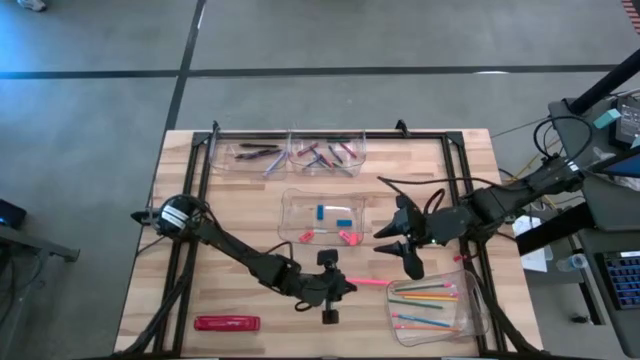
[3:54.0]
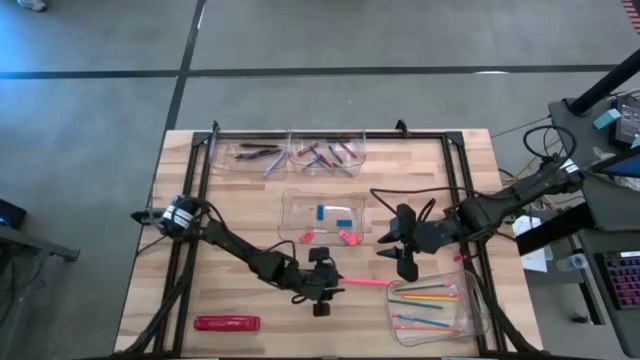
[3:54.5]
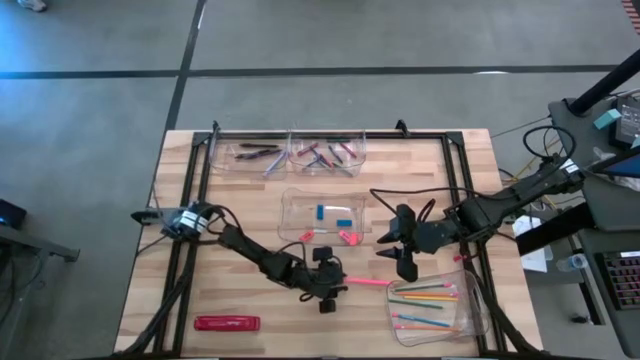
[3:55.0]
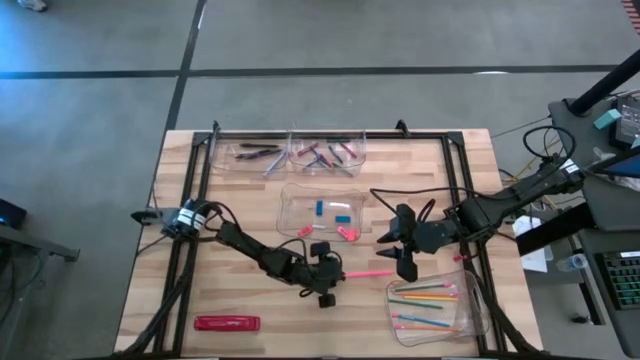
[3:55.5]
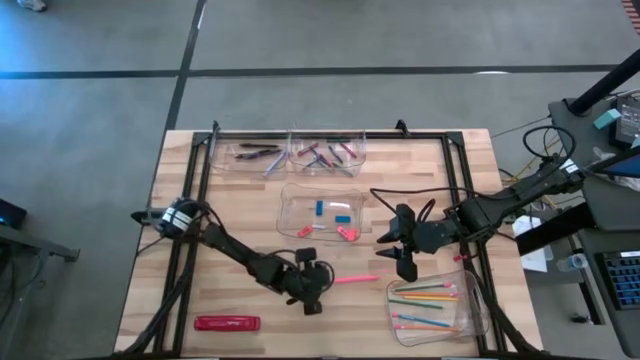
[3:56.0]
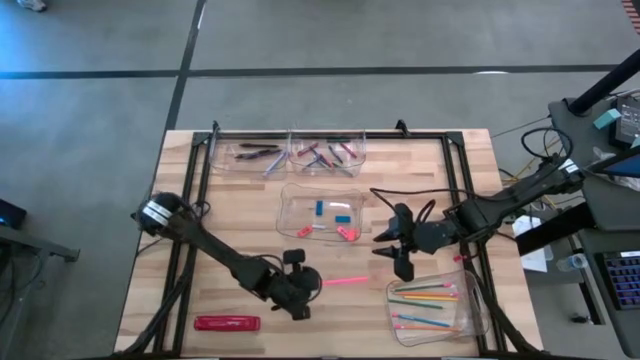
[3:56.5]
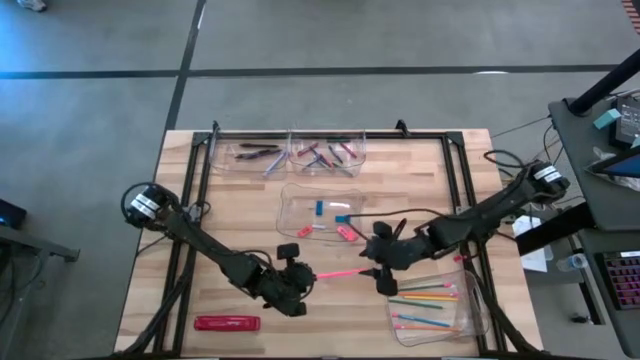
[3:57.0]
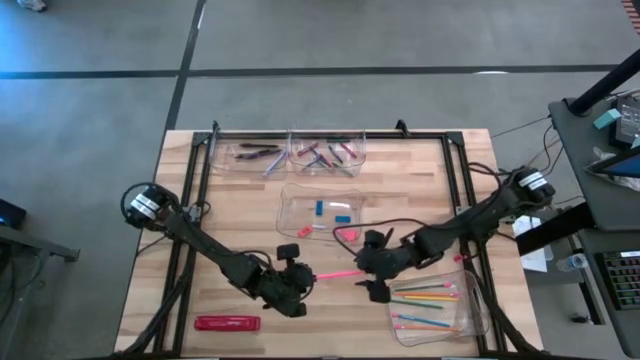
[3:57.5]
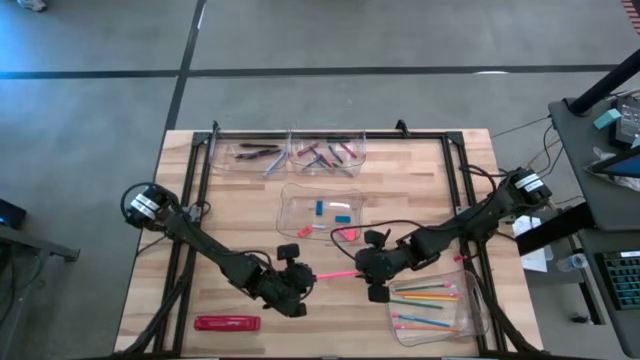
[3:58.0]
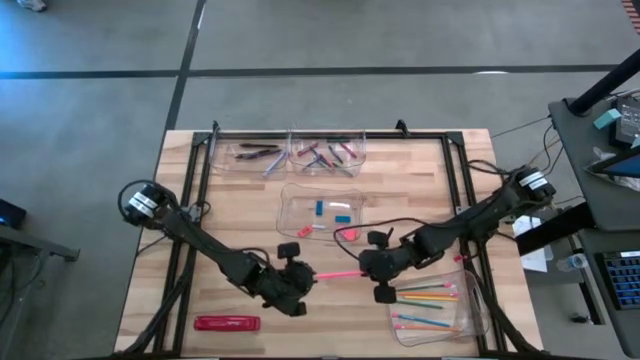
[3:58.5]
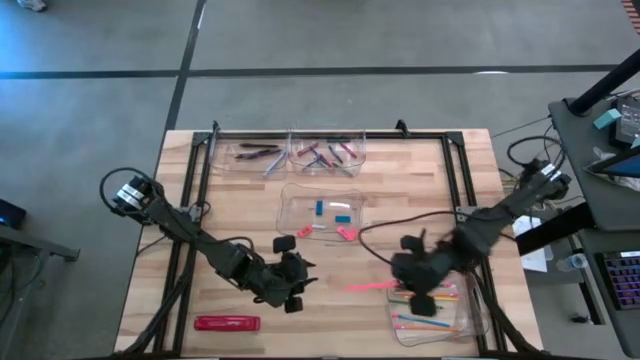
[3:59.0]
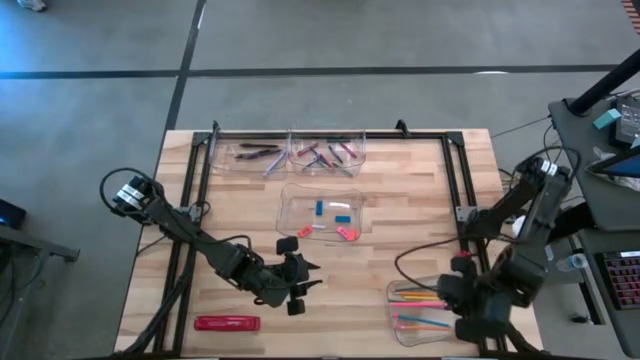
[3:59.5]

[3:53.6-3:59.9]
Task: Sort crayons/erasers/pens/pencils in bins
Put the pink pencil into the bottom transparent bin

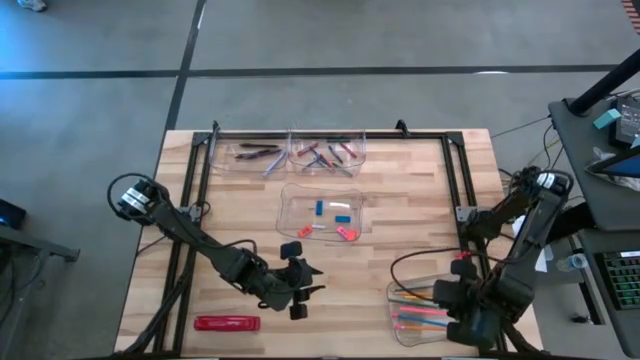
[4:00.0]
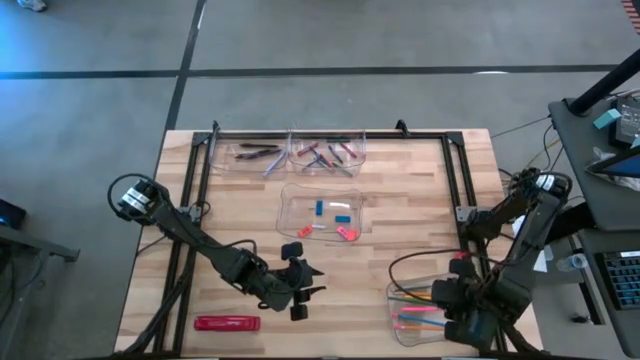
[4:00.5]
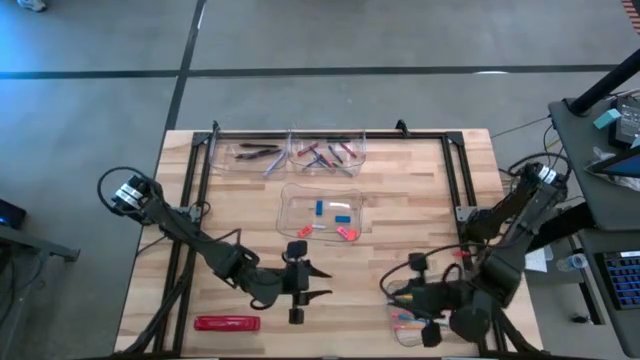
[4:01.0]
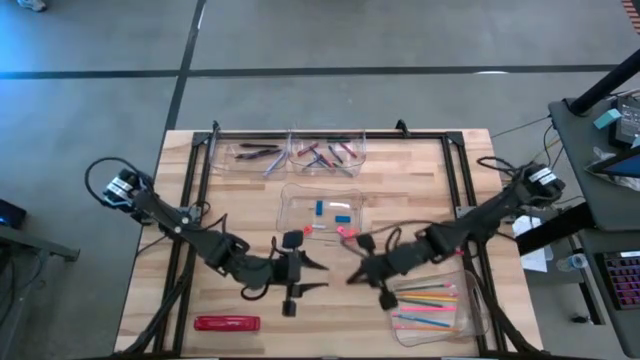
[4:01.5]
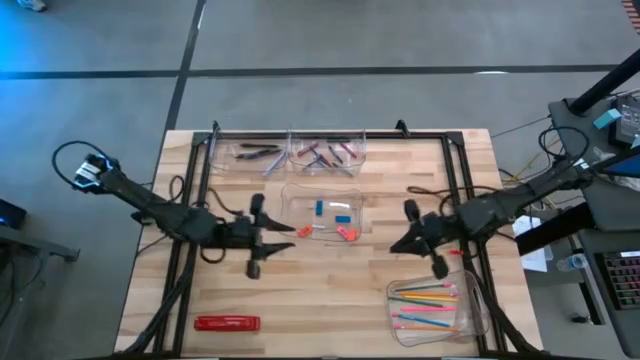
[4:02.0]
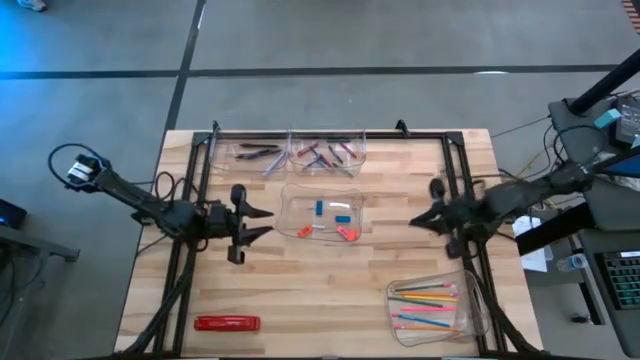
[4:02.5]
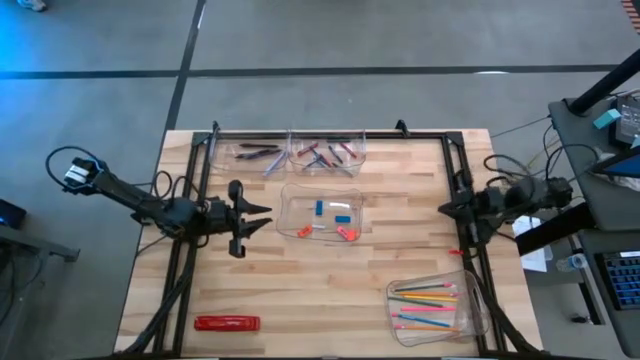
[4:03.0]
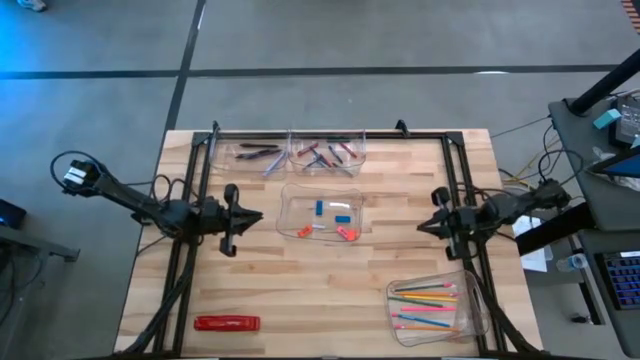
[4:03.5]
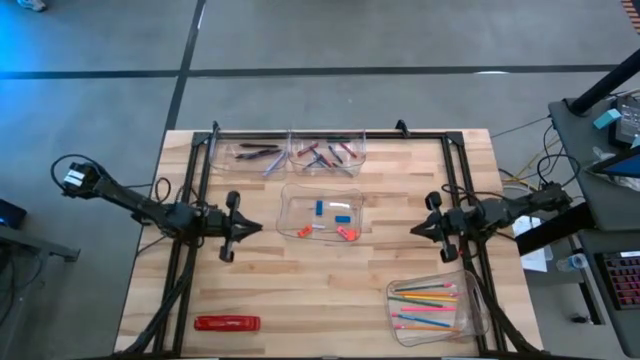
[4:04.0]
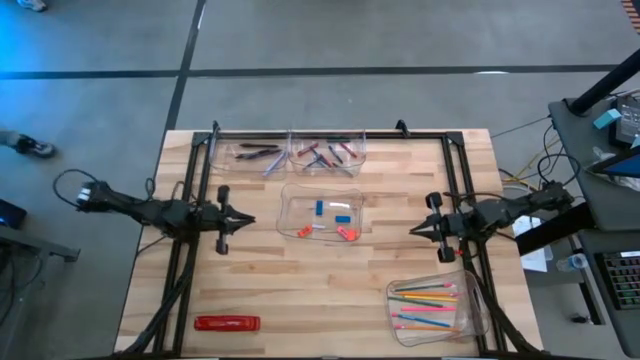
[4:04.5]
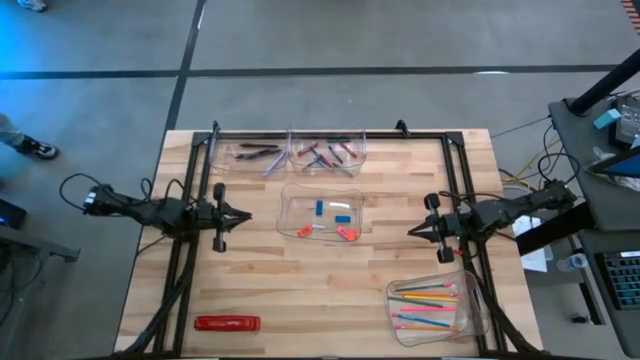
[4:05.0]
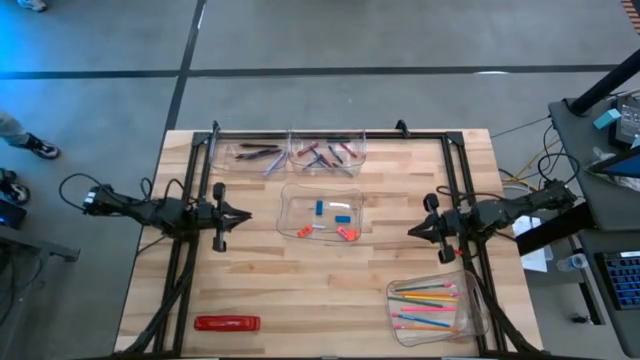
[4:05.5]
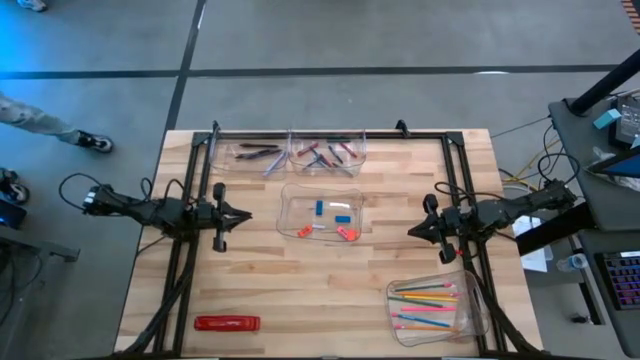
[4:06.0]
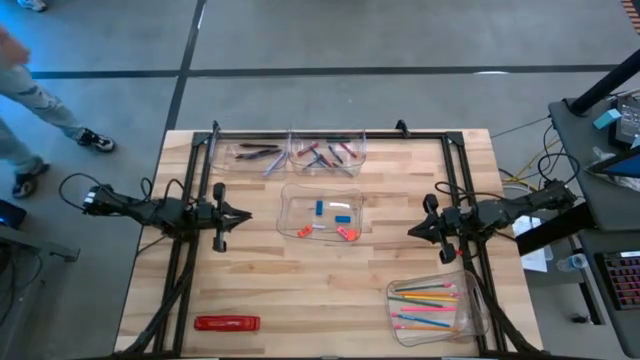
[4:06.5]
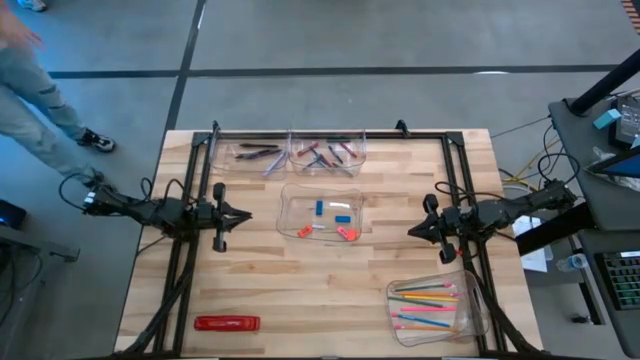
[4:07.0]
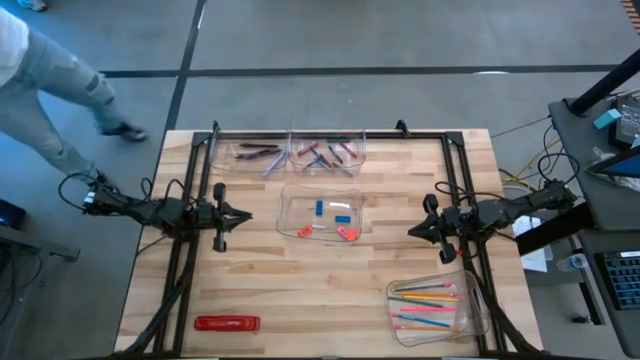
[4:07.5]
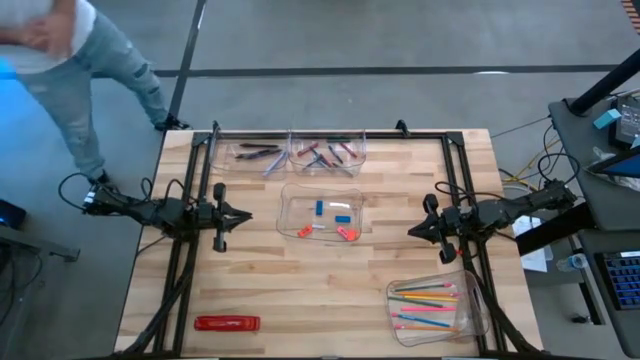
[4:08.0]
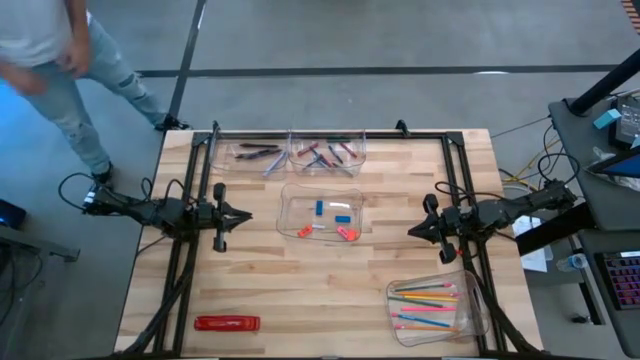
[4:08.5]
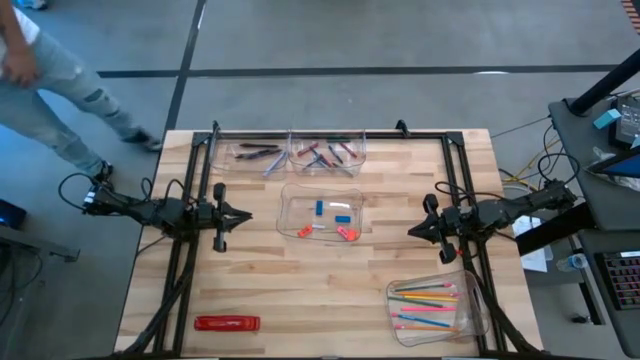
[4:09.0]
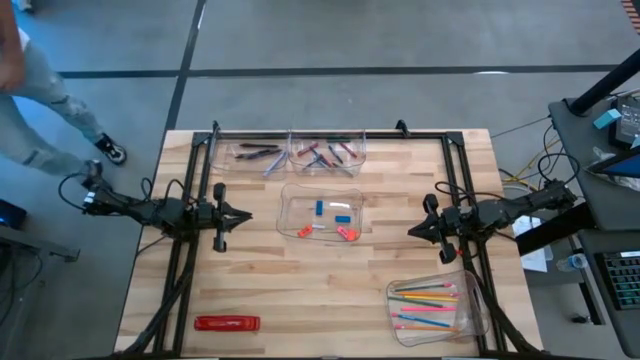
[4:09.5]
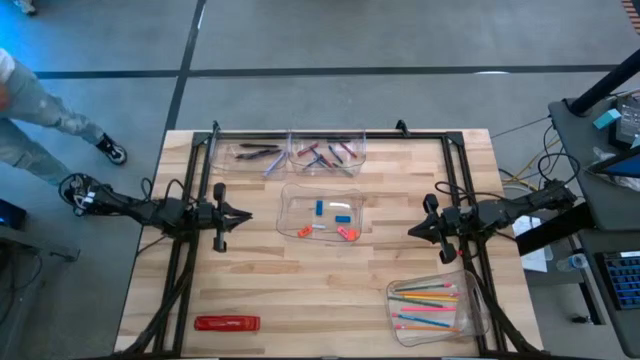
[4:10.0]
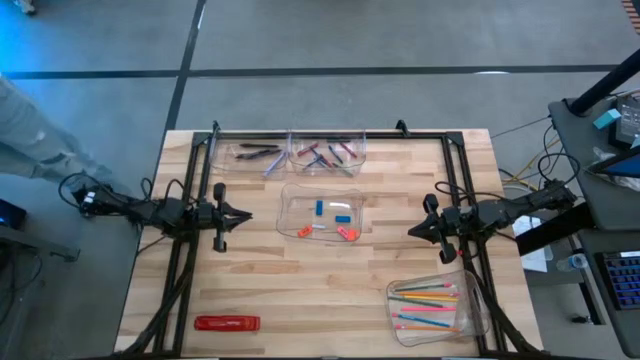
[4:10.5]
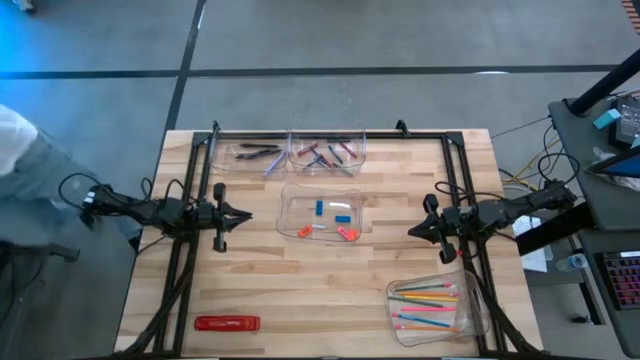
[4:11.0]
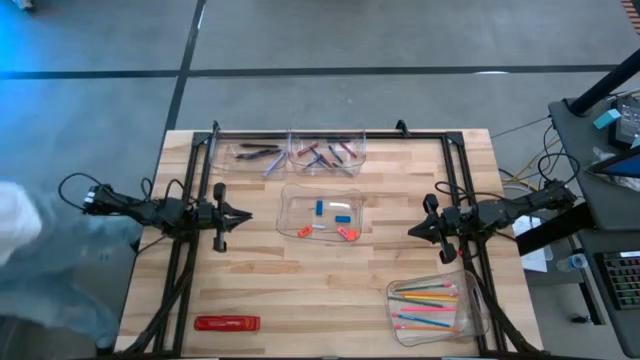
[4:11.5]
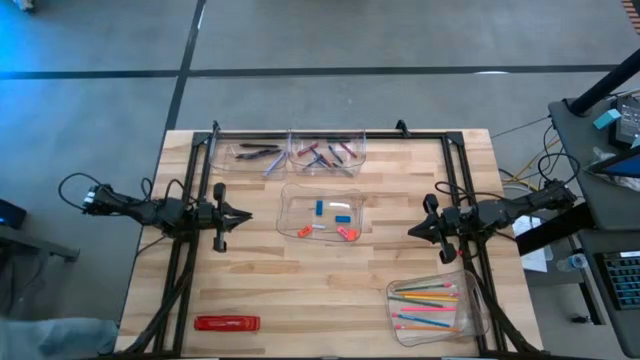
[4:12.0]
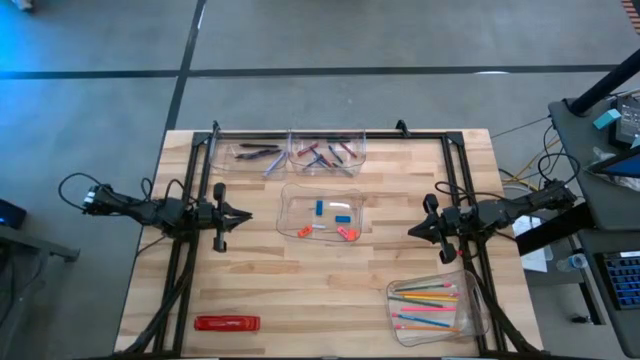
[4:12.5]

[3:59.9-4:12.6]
Return to Home Position

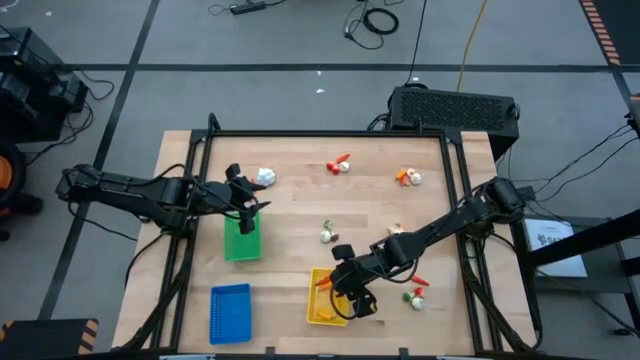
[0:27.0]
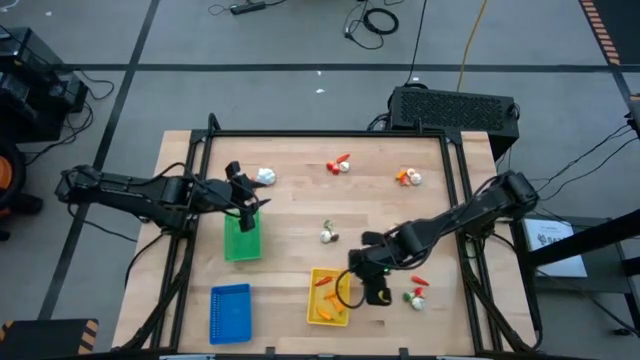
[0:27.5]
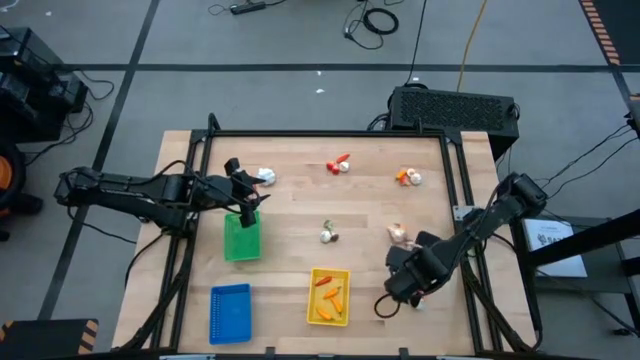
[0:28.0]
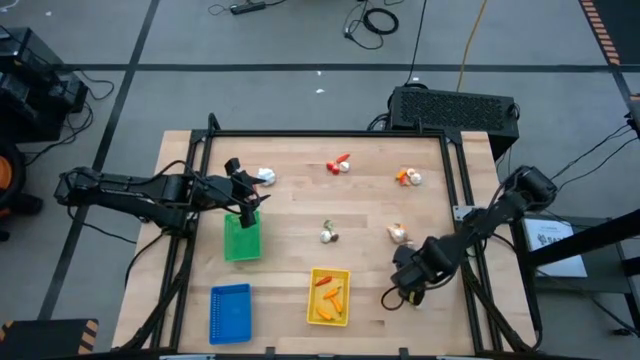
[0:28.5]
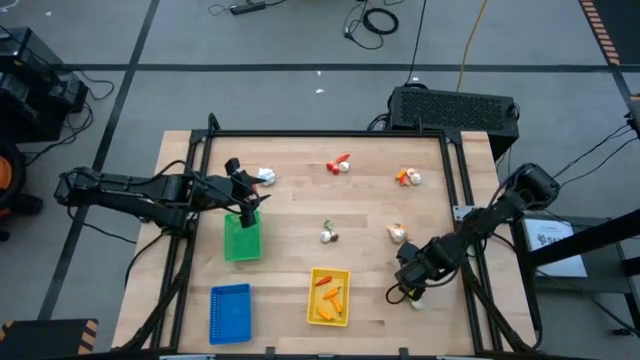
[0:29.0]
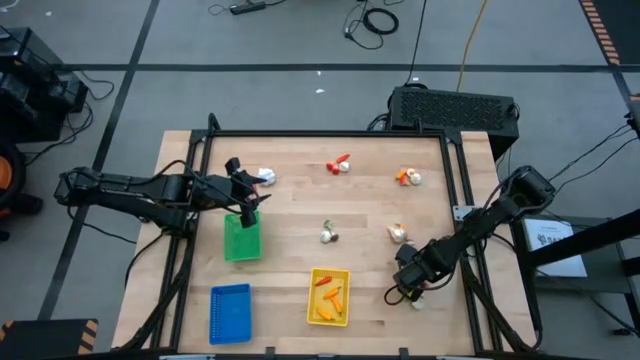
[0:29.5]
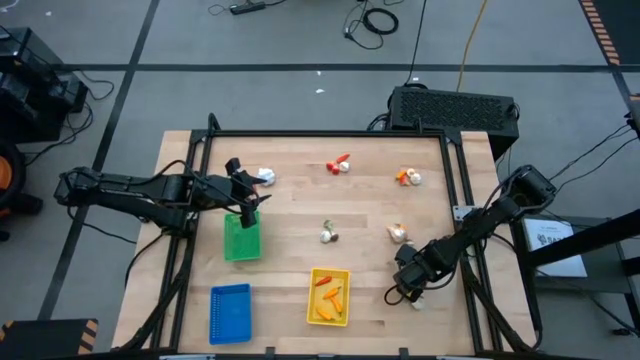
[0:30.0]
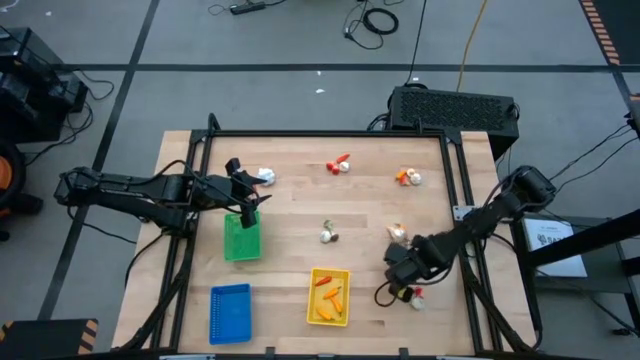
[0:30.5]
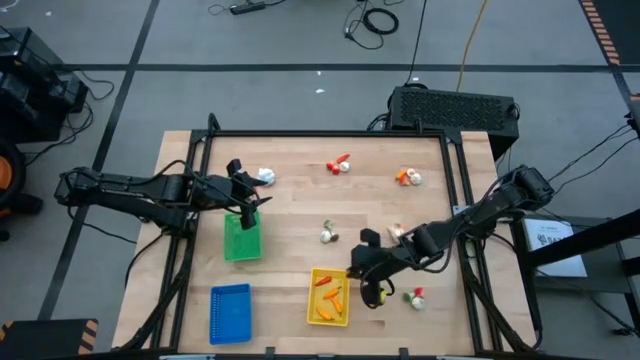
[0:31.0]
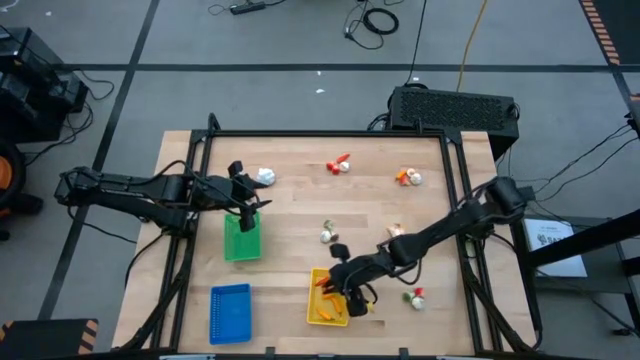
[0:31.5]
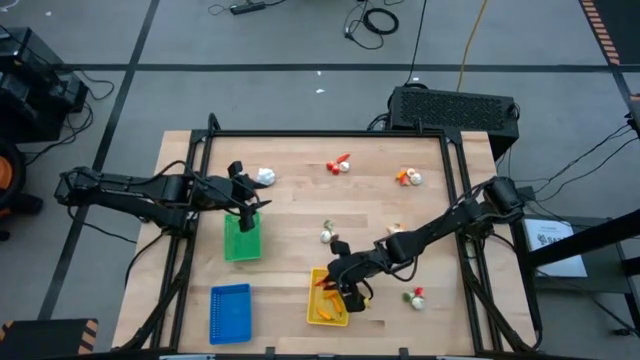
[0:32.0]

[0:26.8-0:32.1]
Task: Sort produce into baskets
Put the red chili pepper into the yellow basket
